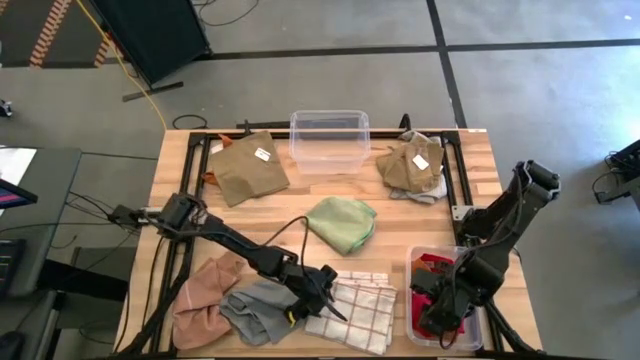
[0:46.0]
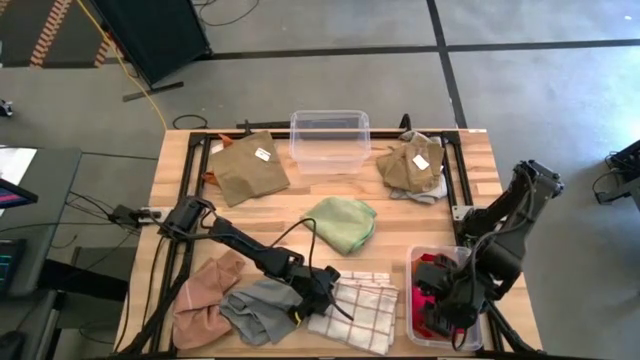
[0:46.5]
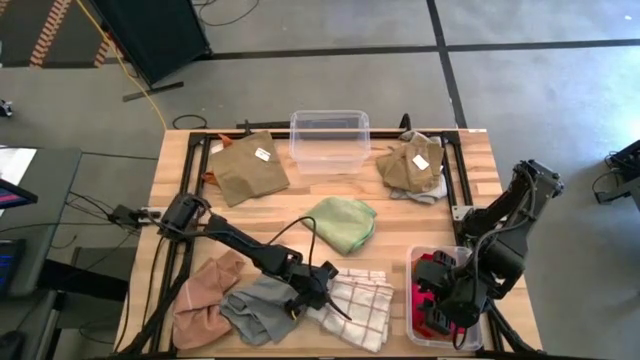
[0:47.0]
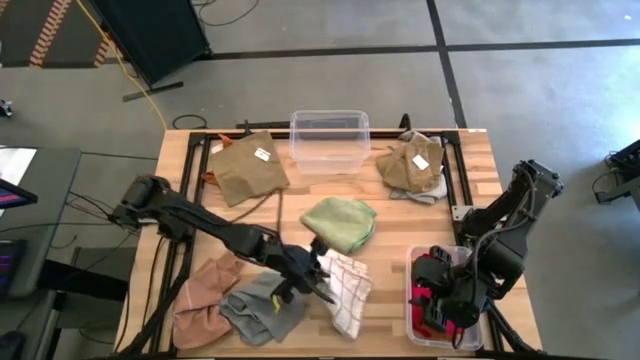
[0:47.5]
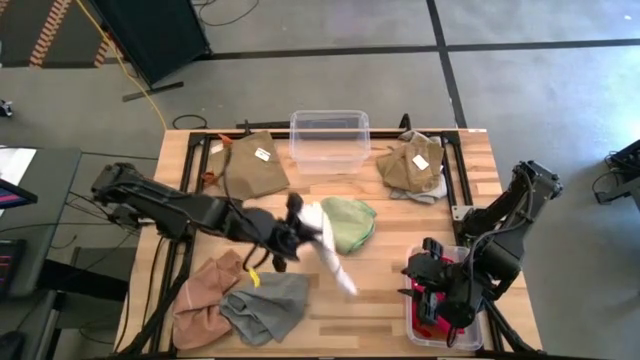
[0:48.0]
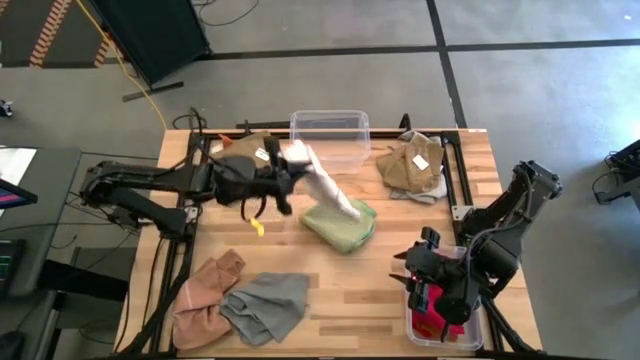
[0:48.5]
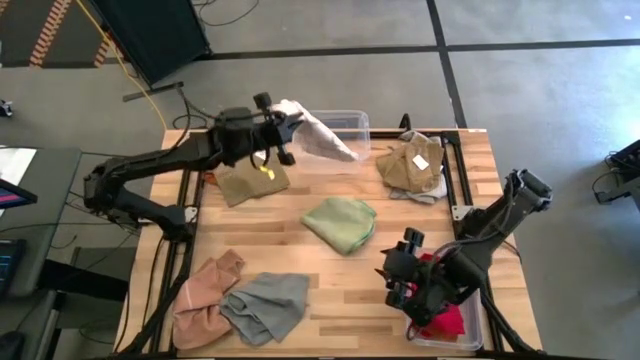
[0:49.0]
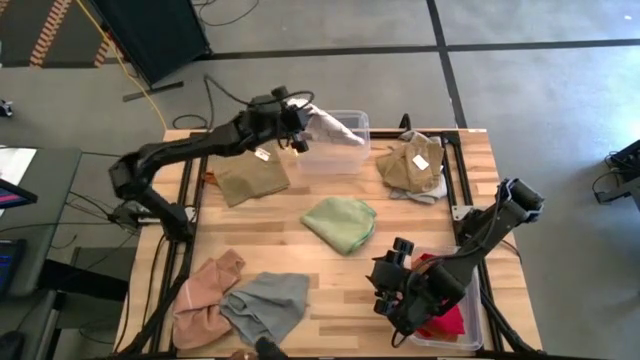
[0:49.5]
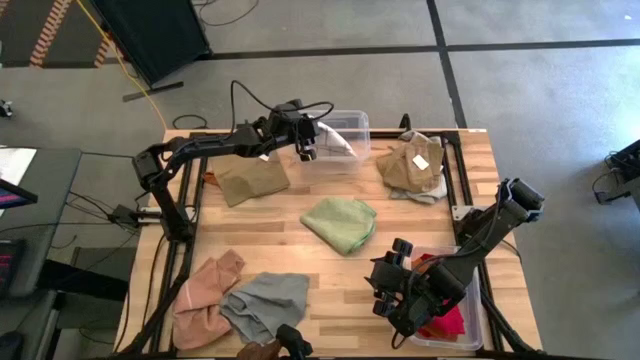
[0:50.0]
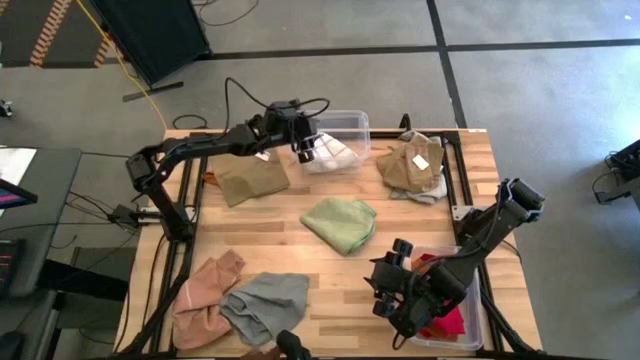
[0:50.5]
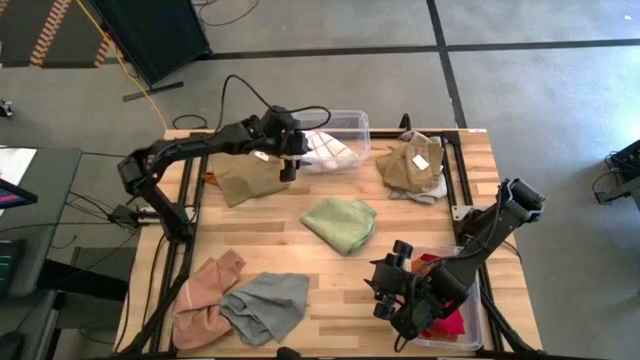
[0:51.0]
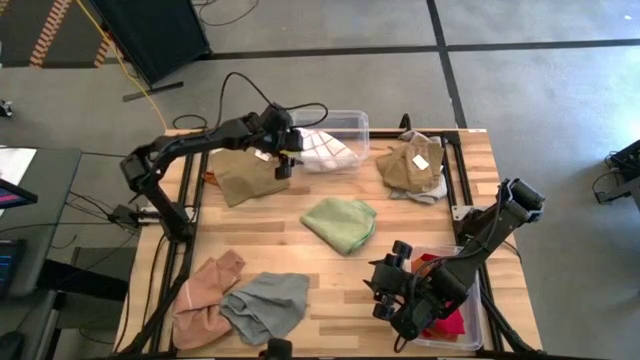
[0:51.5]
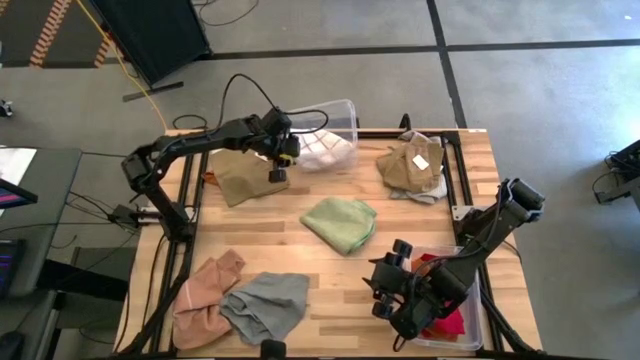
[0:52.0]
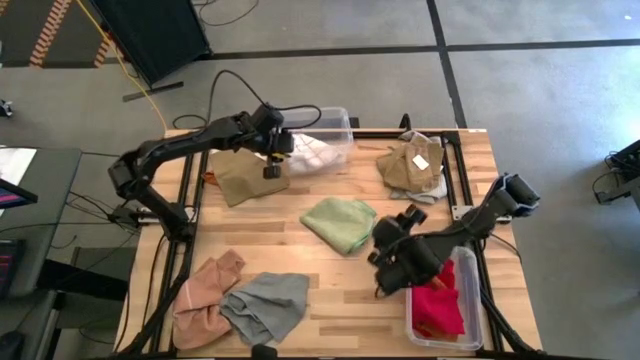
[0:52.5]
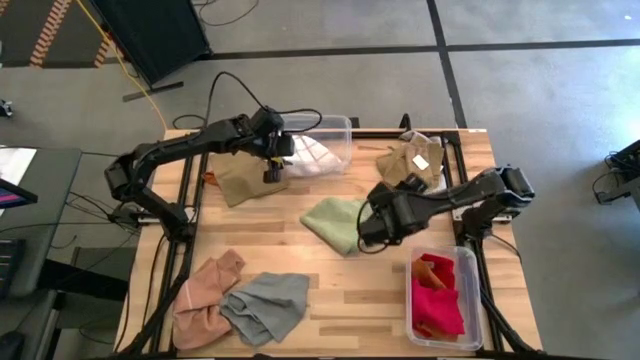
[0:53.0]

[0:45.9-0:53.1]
Task: Sort towels by color in basket
Put the white patterned towel into the top transparent bin

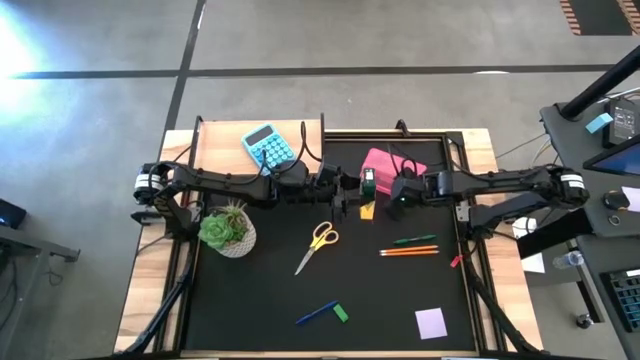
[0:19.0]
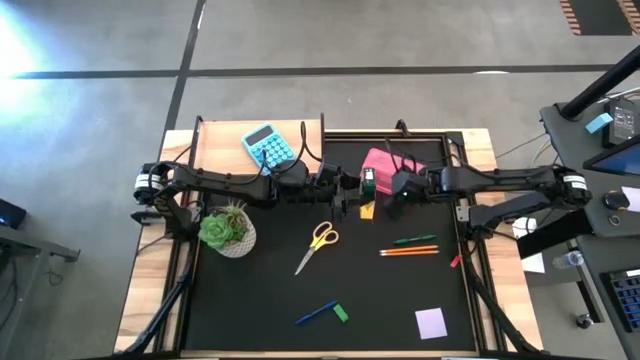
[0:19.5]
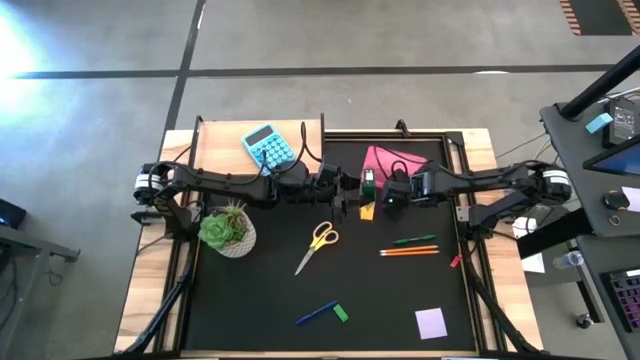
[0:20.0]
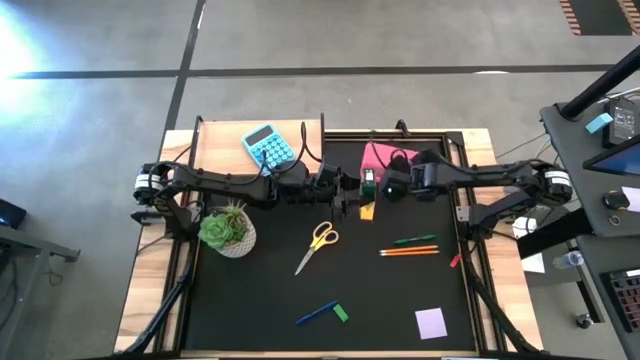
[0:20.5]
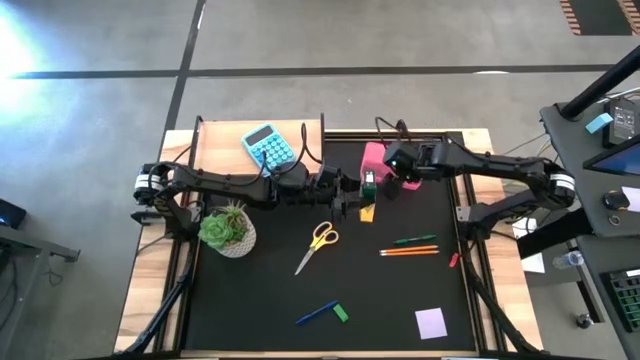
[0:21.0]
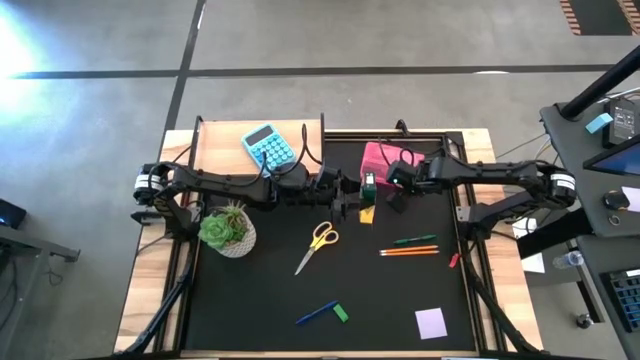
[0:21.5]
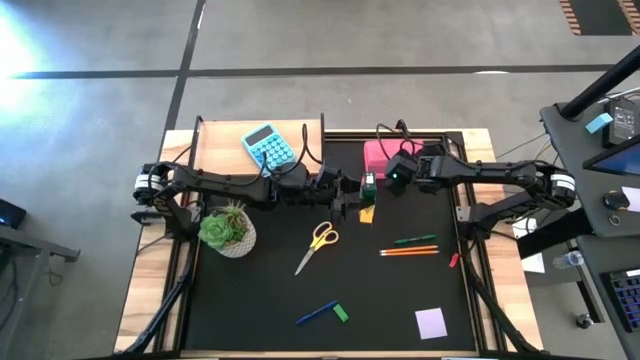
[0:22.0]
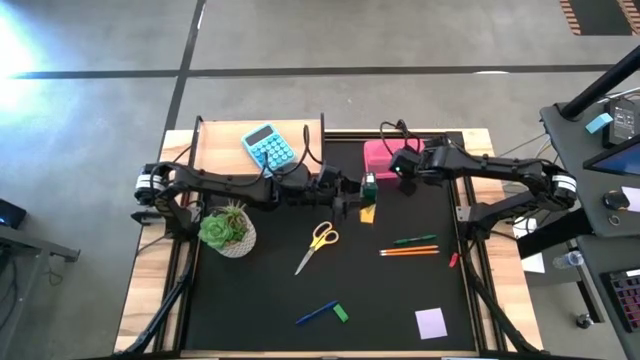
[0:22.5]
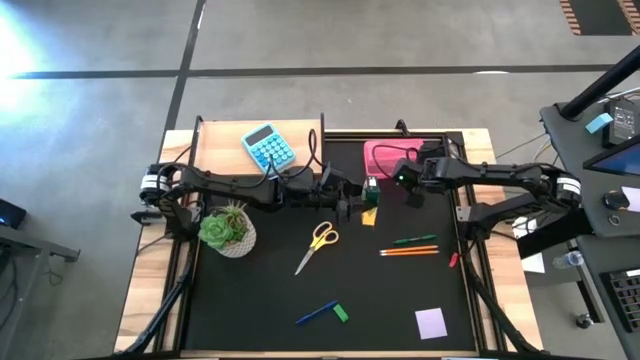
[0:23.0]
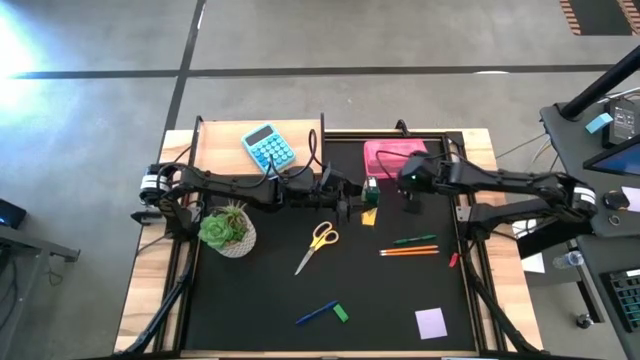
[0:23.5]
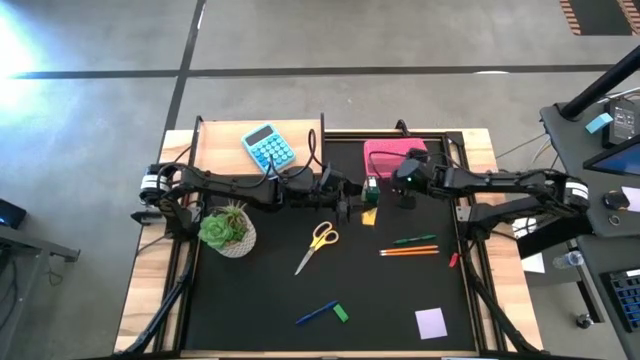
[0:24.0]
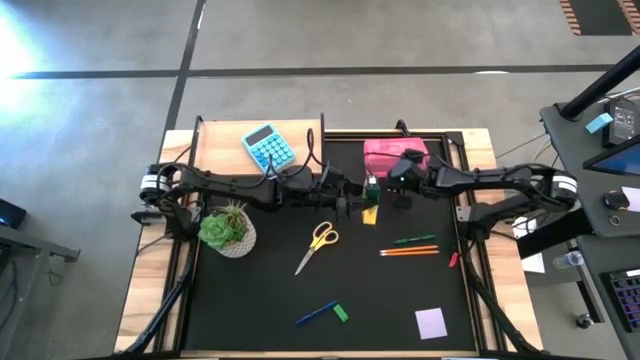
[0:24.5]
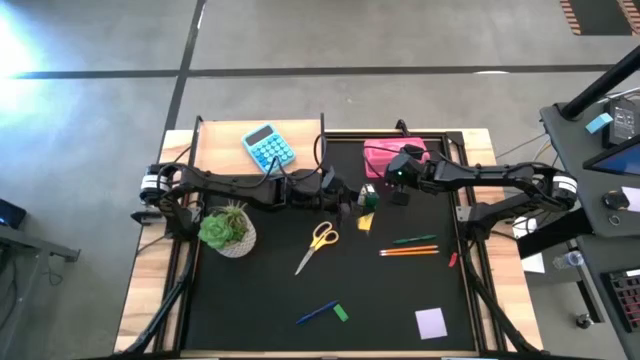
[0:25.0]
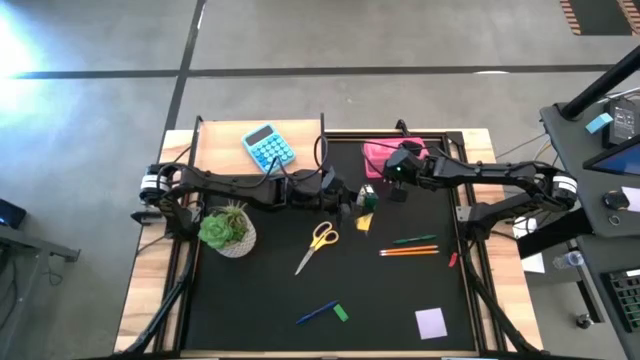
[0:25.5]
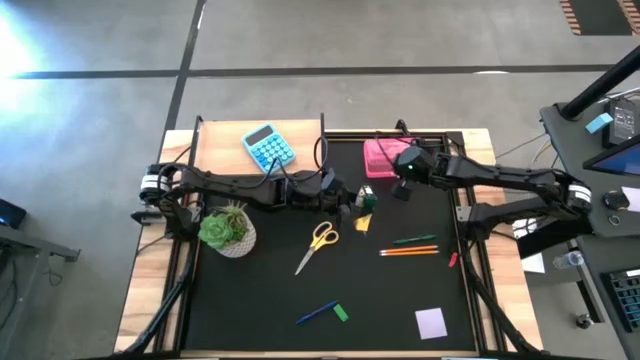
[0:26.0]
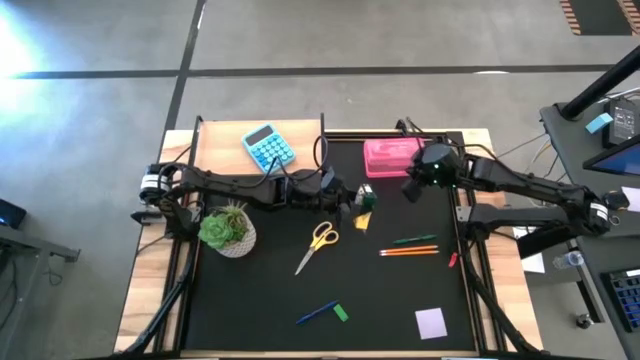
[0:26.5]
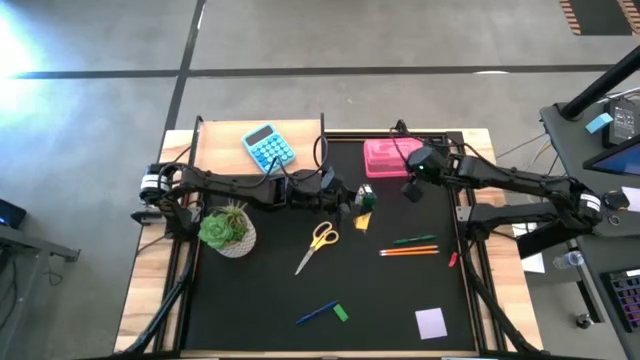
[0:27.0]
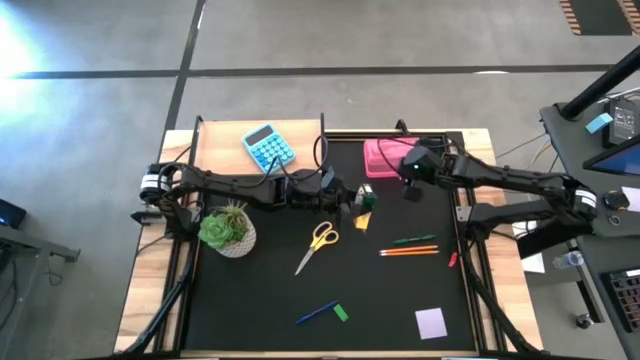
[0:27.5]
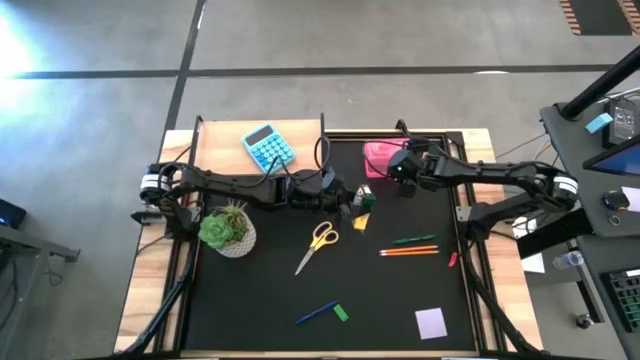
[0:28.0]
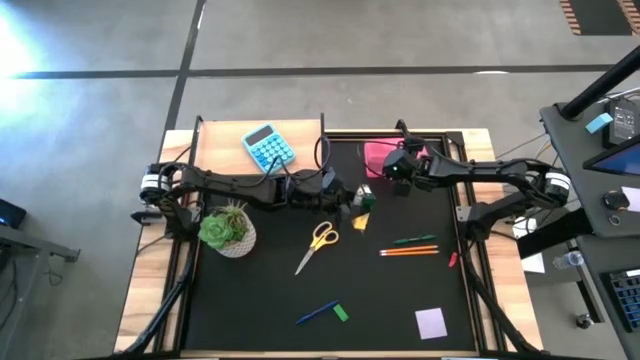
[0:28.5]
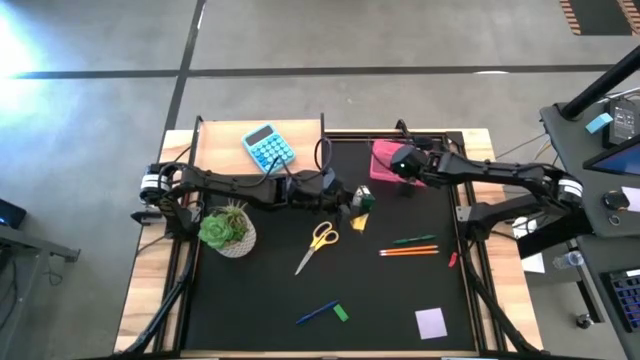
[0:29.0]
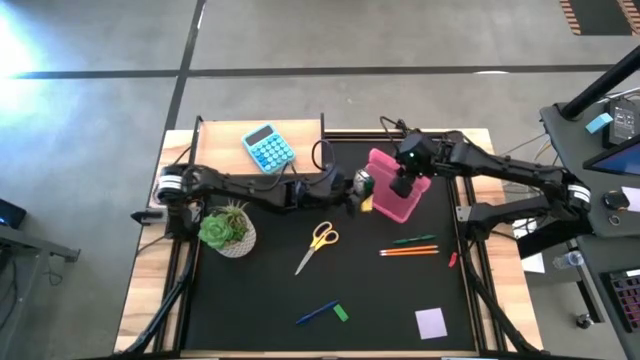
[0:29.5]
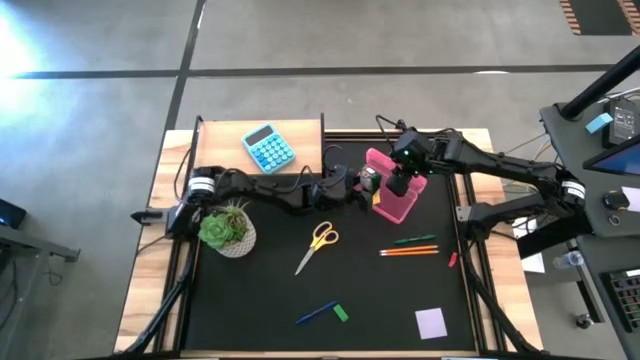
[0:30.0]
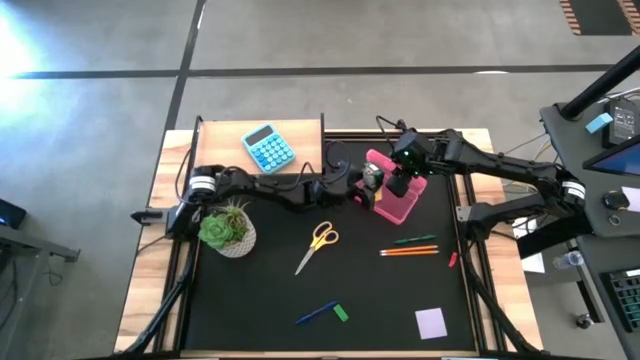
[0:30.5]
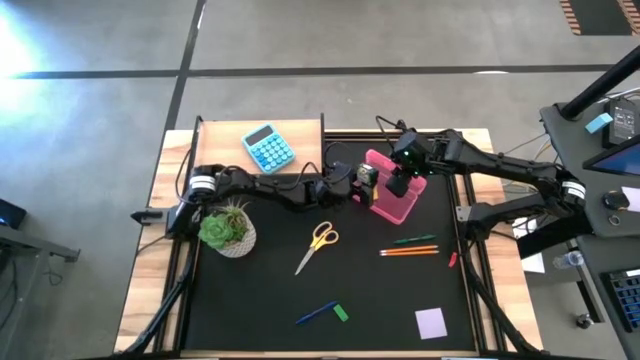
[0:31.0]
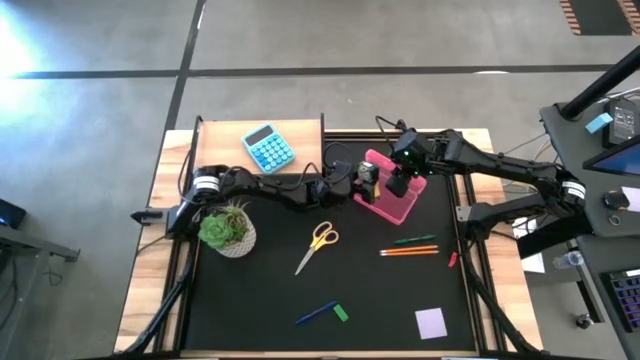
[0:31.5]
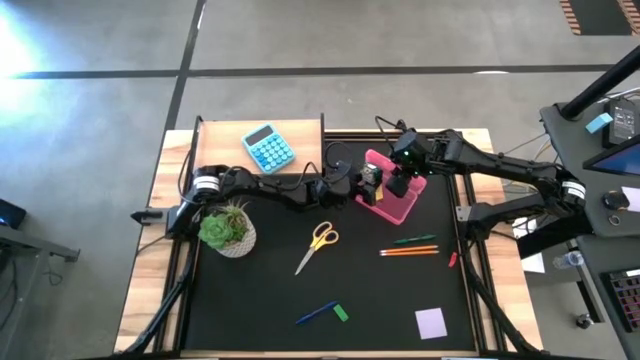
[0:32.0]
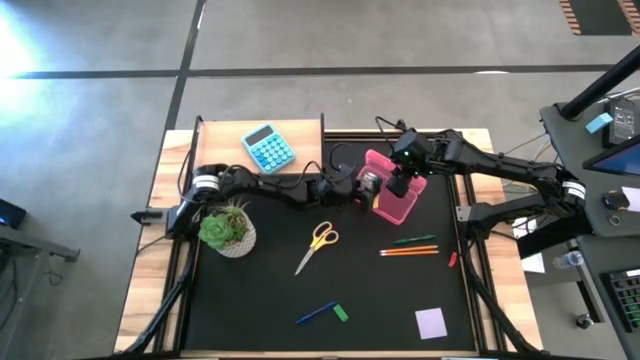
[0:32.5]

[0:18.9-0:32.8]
Task: Pack school essentials
Put the yellow crayon box into the pink supply box
